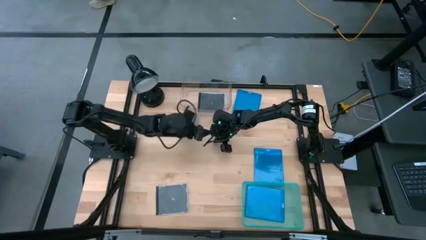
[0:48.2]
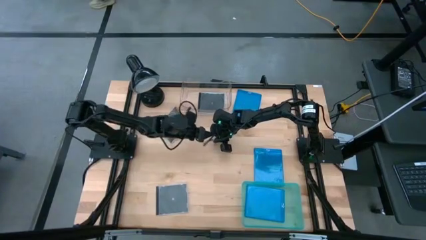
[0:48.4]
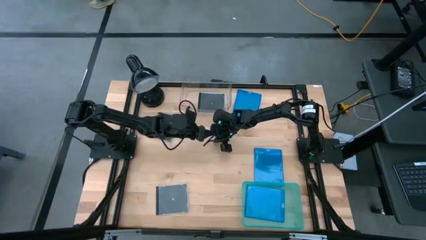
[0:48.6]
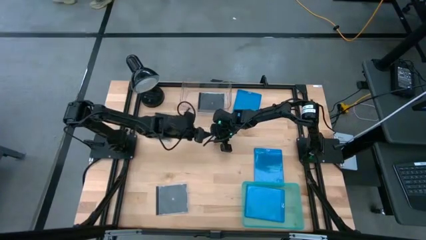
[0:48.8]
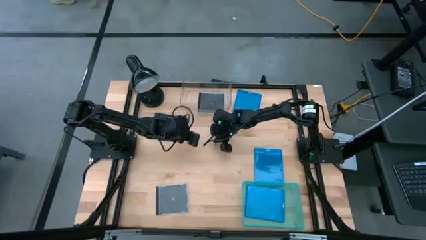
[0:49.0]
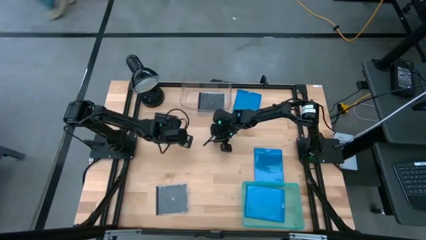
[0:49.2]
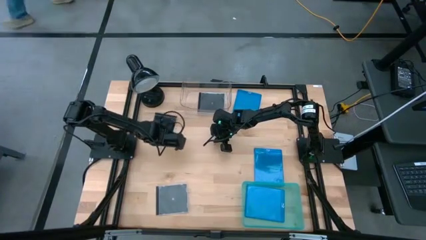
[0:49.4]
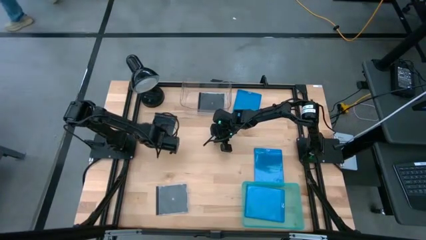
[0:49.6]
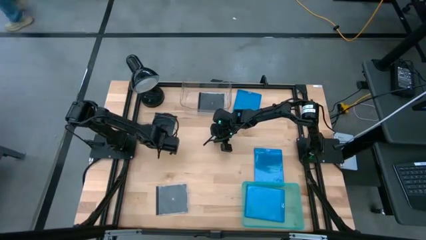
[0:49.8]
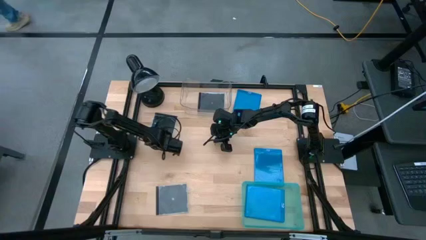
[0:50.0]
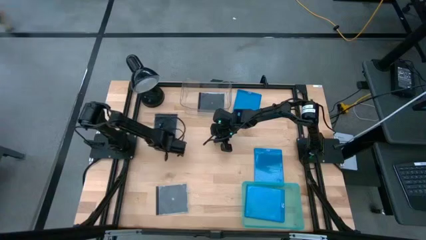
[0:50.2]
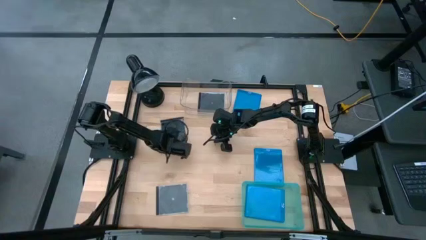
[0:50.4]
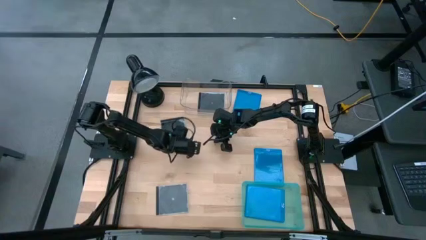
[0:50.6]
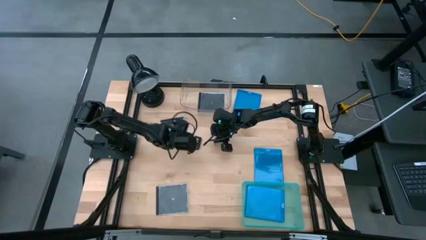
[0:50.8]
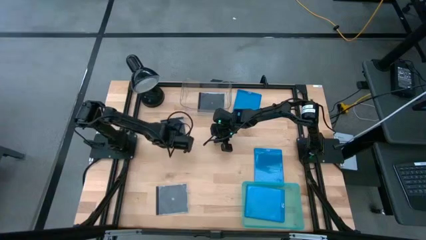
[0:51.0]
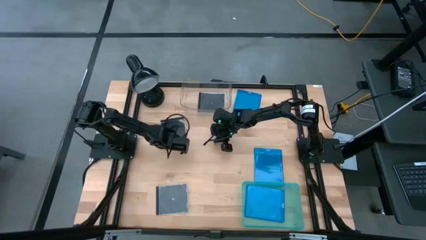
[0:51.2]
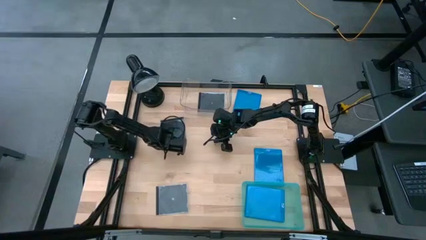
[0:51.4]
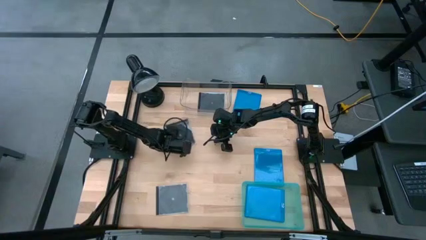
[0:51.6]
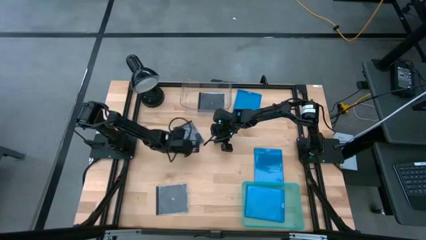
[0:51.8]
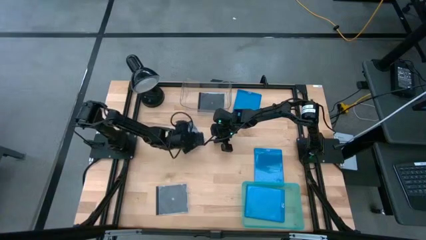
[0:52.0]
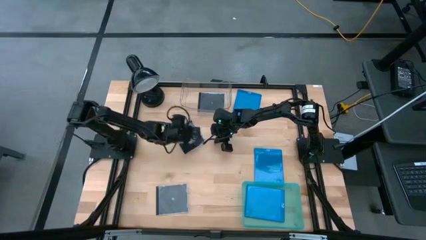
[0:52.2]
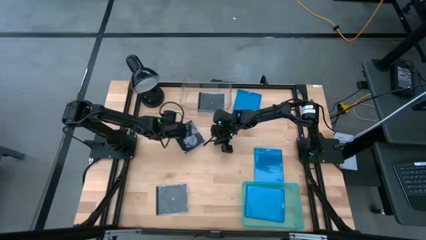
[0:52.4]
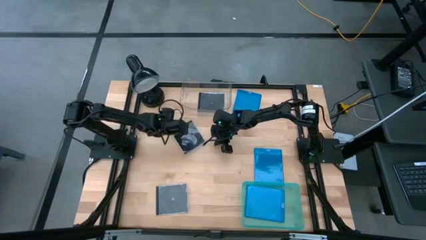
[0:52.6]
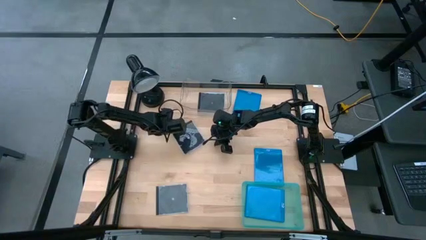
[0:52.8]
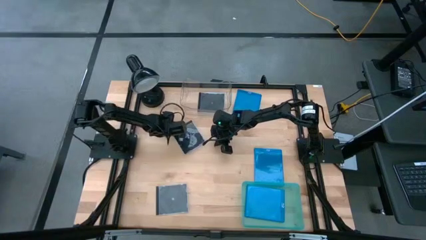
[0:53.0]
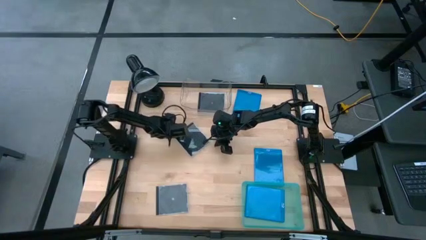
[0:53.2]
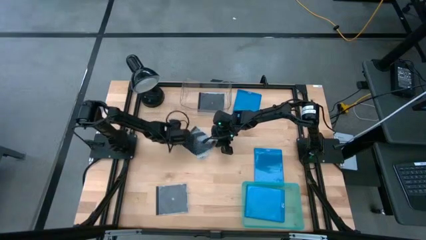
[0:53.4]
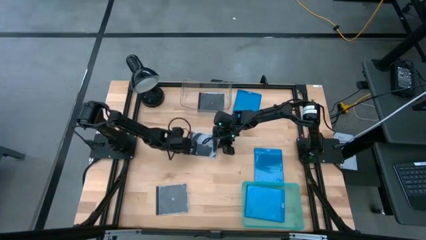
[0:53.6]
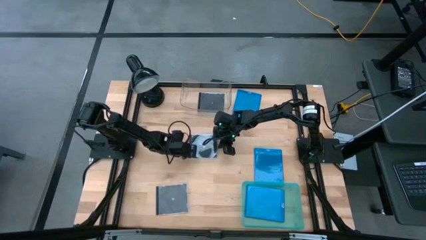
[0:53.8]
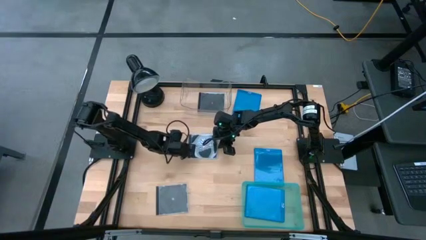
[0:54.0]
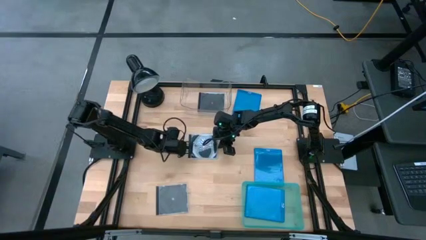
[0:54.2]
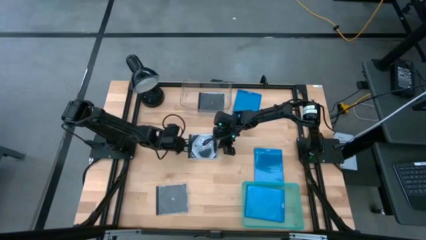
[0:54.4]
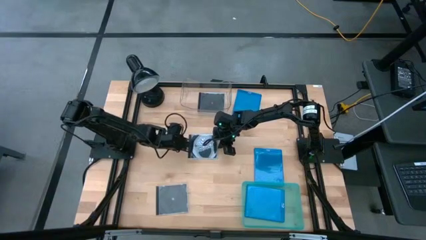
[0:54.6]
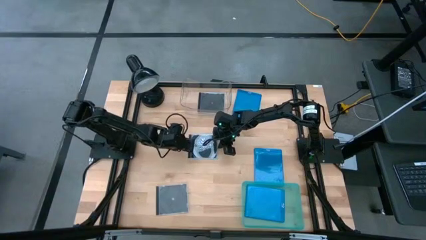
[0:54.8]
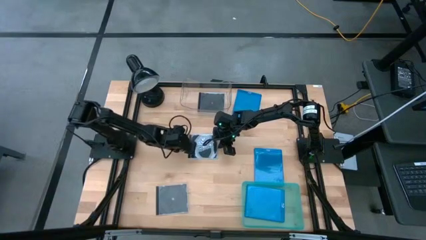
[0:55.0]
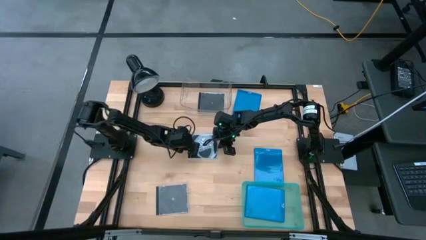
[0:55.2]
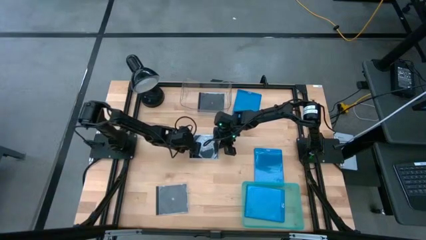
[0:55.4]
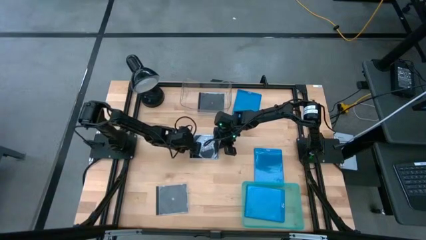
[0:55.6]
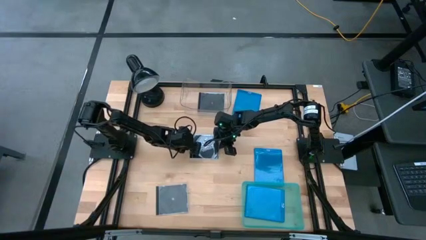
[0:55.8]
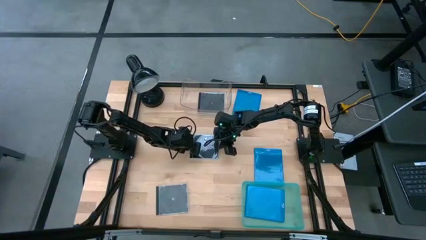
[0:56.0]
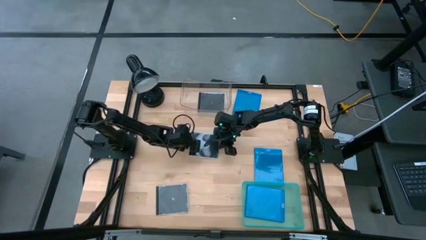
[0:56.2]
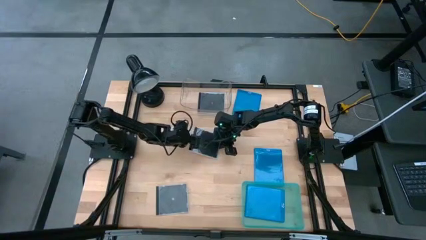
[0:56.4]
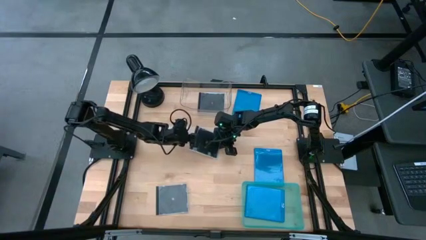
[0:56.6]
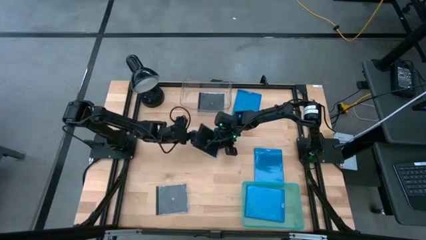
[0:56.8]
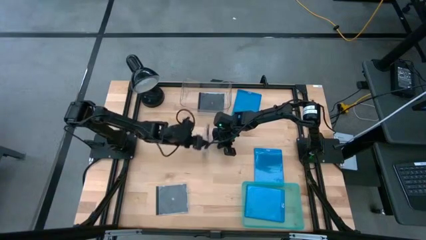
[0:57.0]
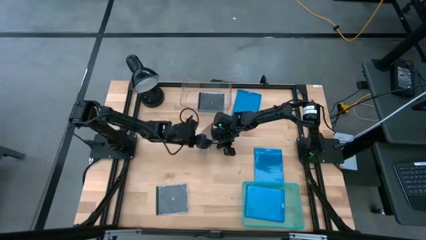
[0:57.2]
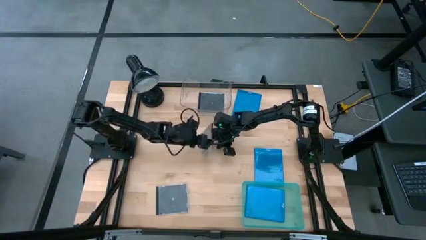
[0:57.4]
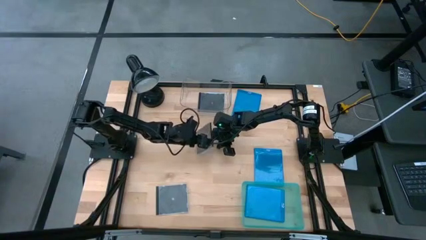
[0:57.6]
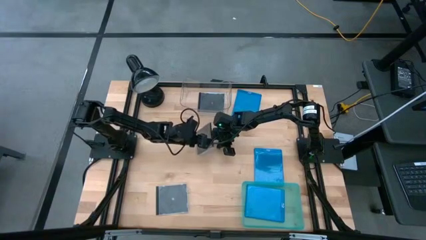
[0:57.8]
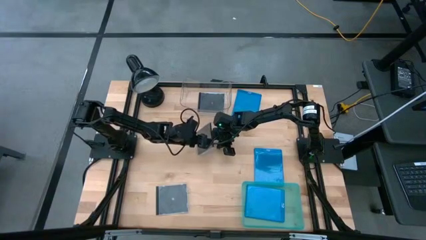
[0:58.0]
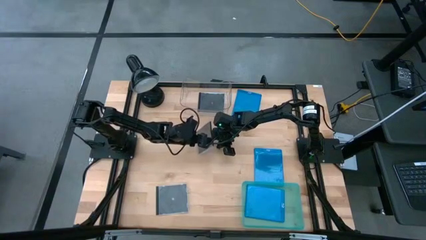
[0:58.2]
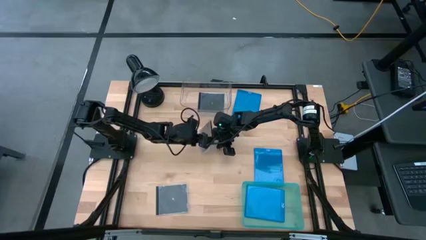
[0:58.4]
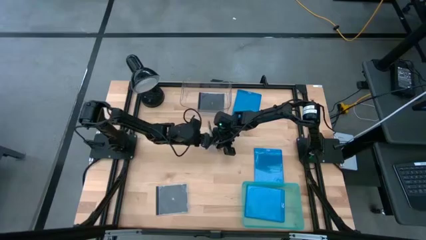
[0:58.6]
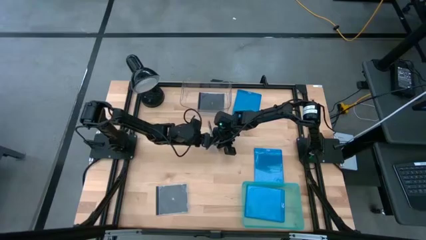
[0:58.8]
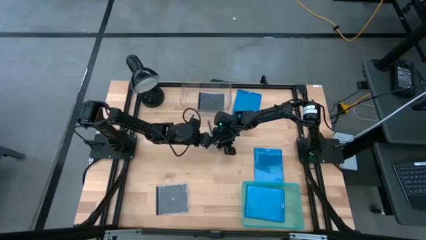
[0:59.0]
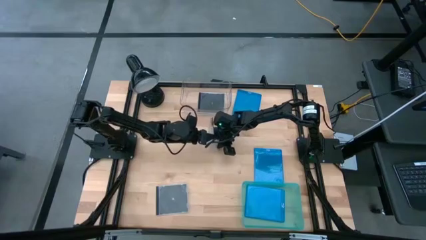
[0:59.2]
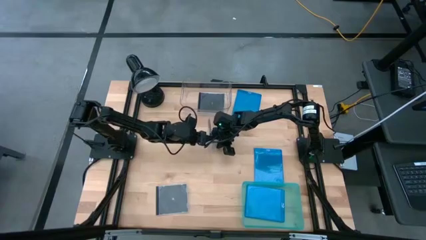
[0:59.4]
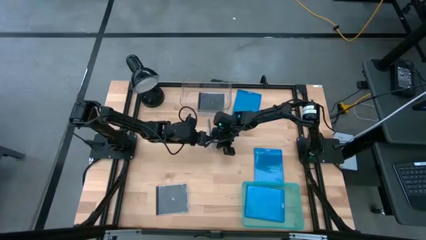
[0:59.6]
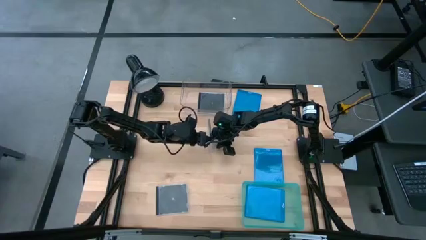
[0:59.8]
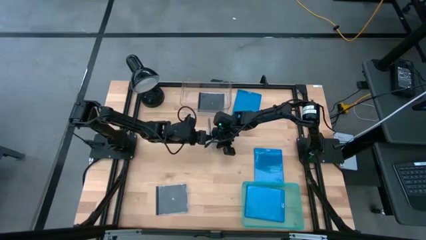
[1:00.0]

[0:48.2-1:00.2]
Task: Pick & place jewel cases by type
Put the top black cd case into the transparent bin

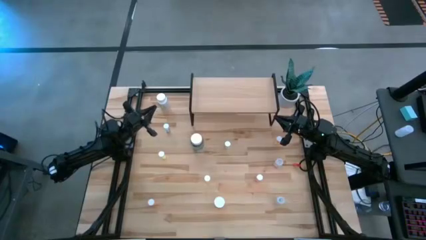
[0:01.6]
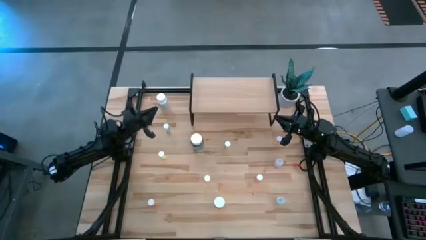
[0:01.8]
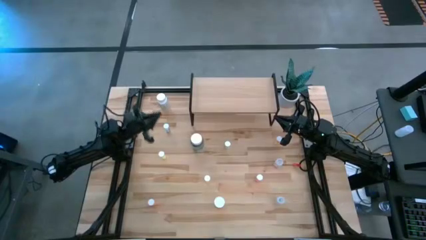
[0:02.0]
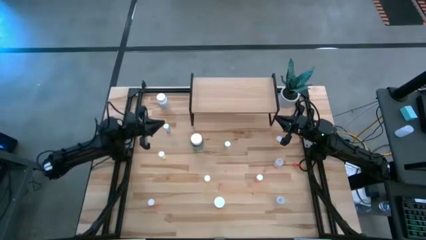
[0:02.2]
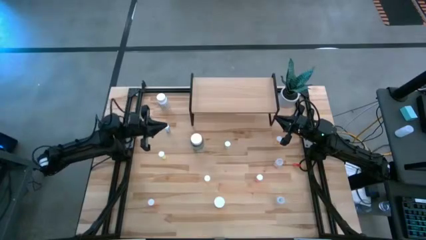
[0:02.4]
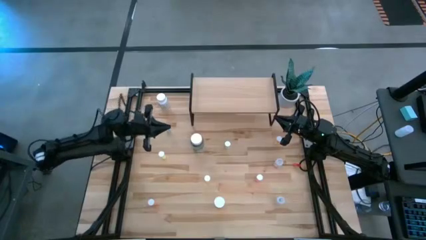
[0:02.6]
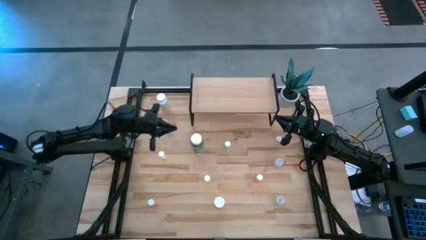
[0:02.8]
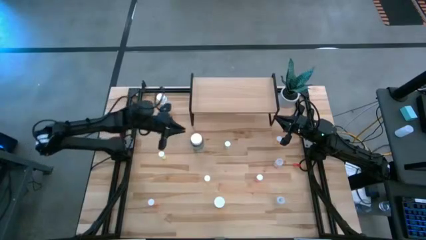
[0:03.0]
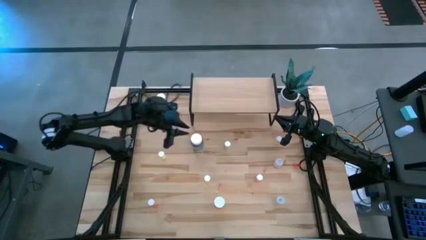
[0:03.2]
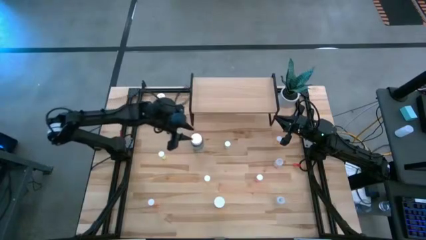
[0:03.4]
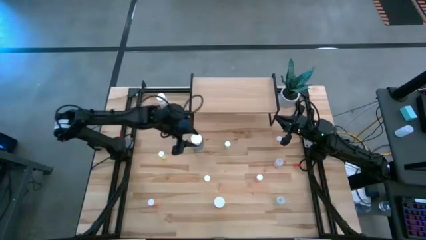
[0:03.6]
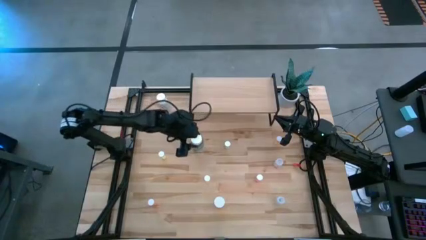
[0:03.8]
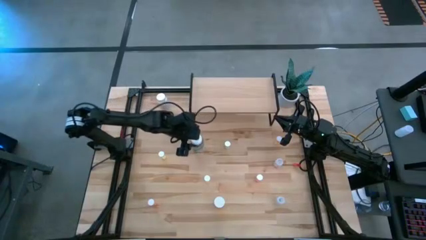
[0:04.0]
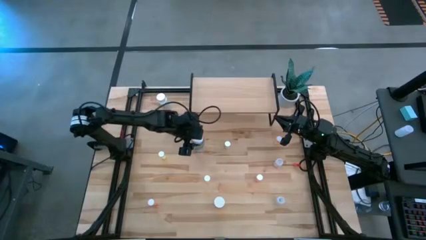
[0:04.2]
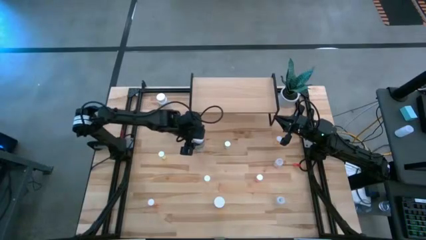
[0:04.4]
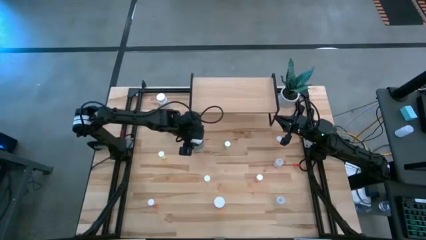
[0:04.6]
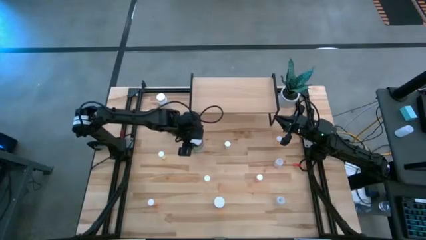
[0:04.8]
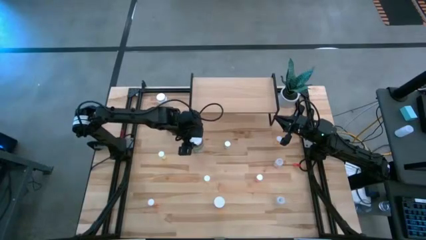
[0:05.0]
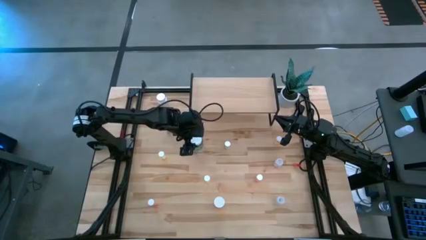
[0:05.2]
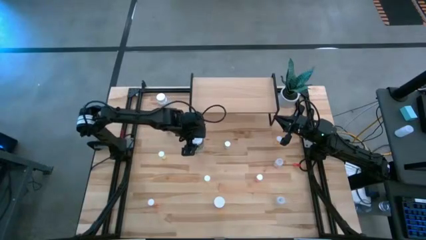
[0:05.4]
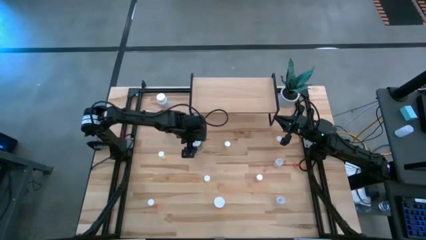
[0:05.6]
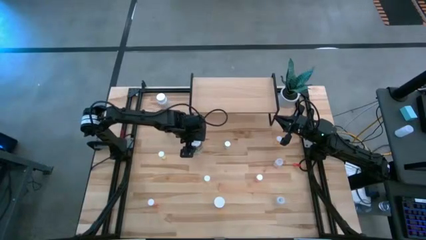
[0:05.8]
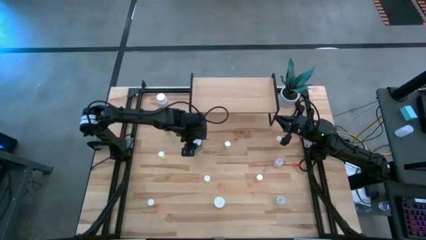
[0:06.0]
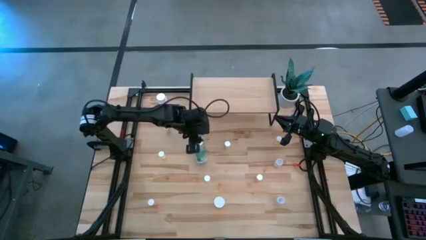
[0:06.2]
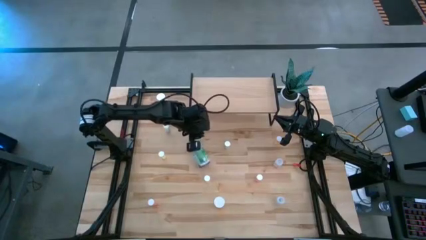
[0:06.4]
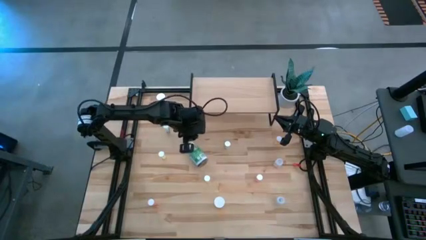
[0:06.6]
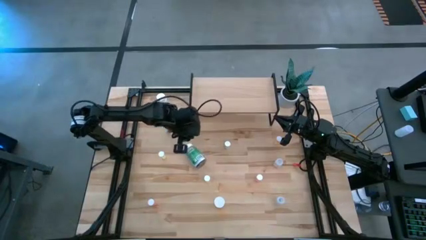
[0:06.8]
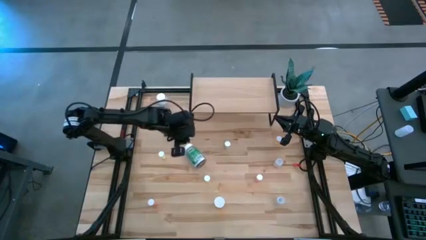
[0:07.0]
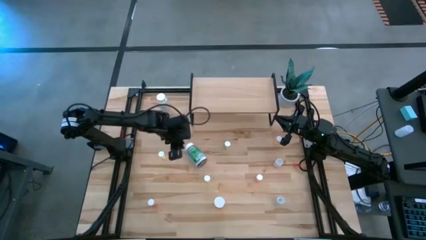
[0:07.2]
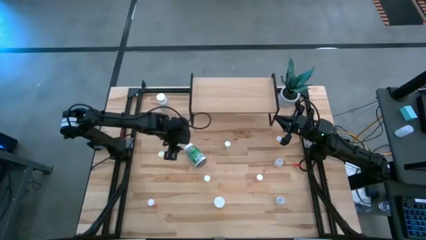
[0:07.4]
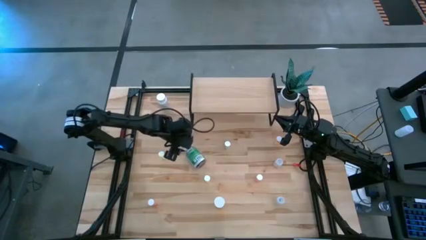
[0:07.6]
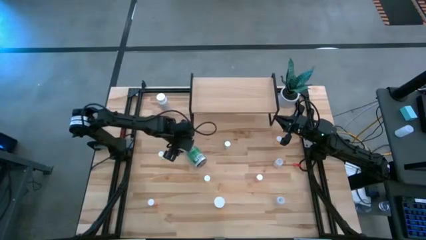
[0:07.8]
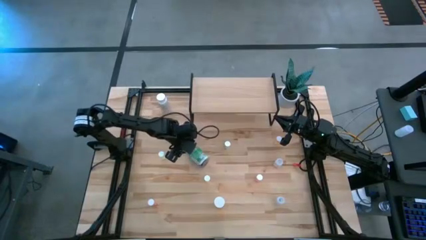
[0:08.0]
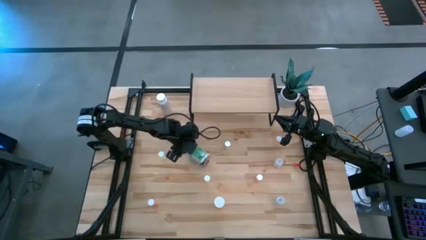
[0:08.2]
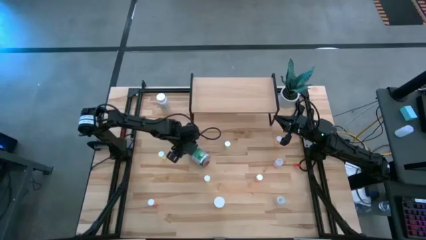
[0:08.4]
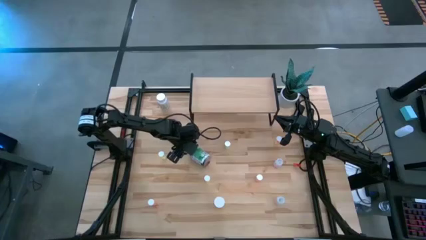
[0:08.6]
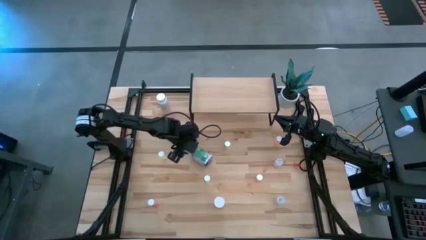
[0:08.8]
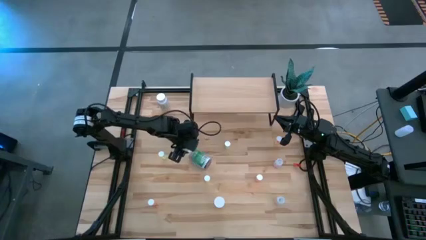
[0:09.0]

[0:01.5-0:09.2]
Task: Pick and place medicine bottles onto shelf by color
Put the green pill bottle on the shelf
